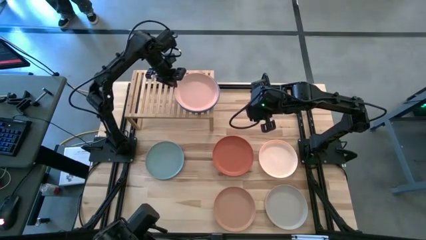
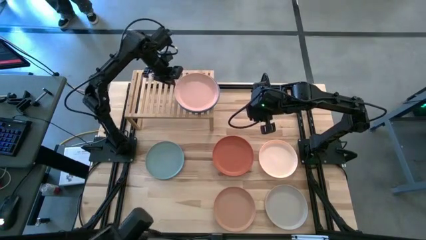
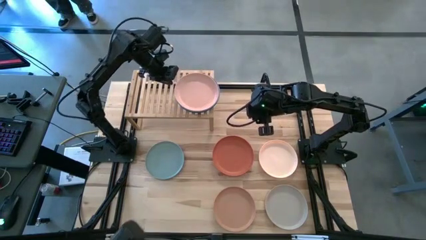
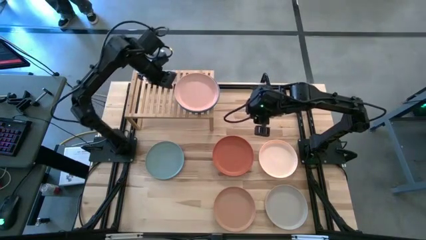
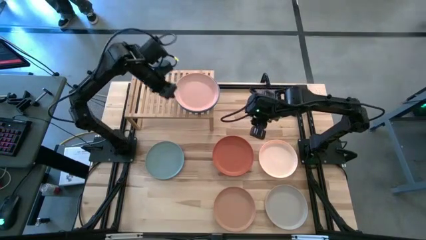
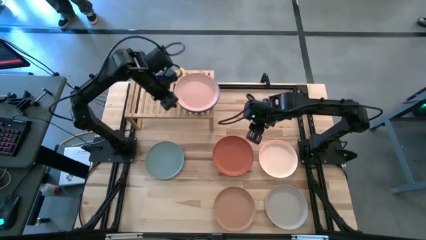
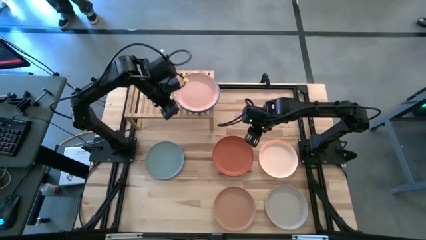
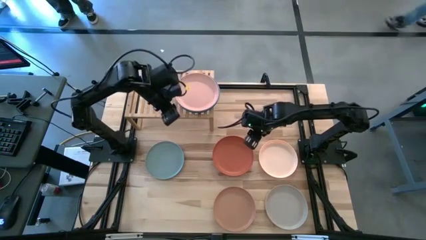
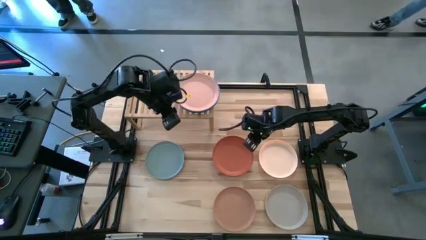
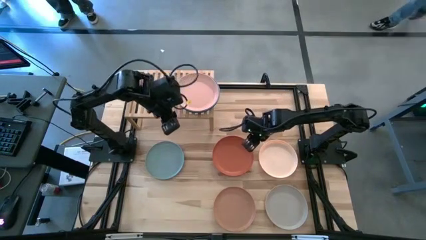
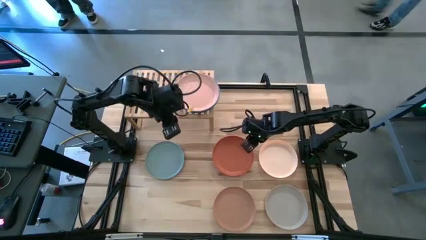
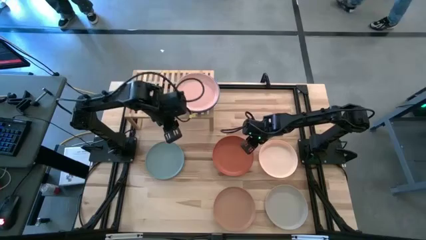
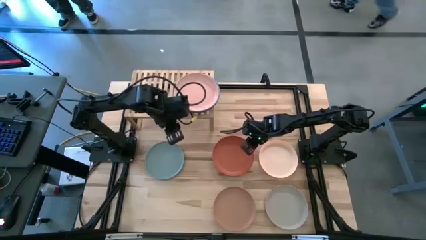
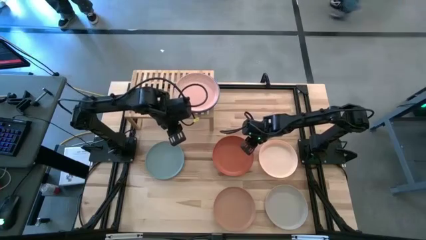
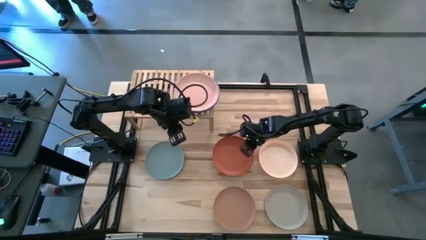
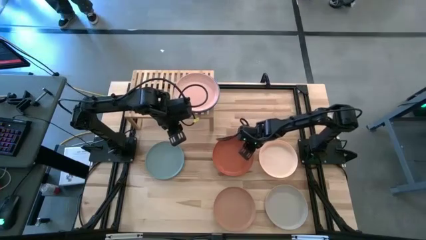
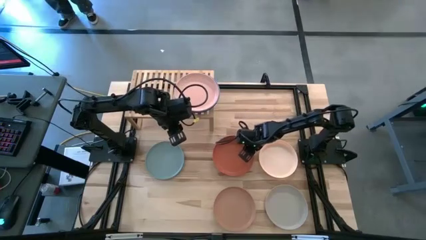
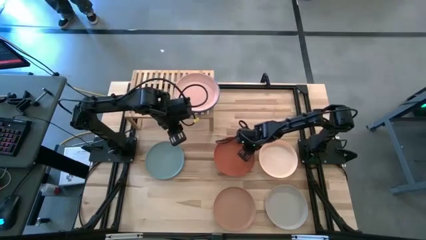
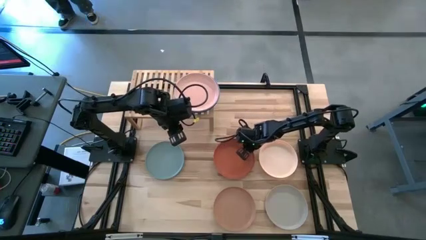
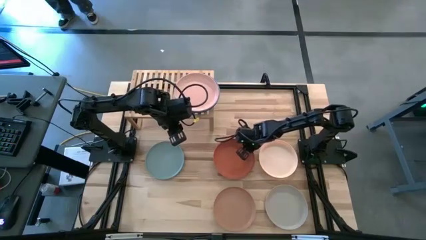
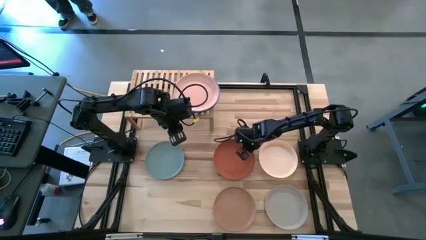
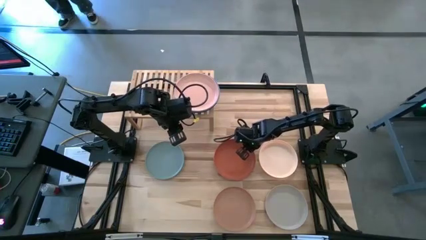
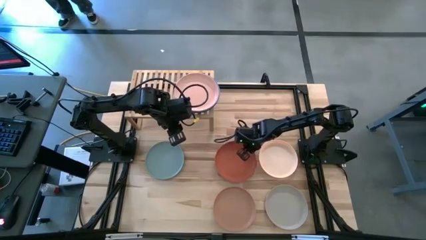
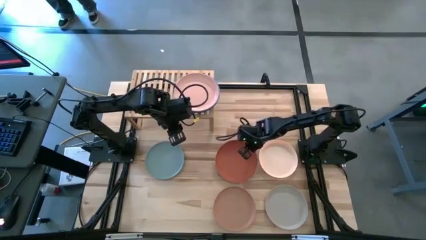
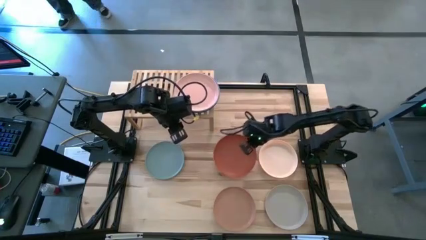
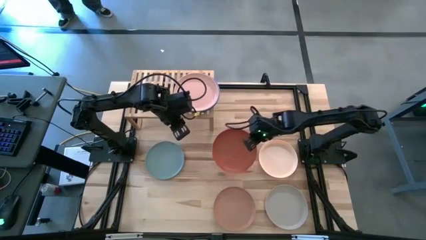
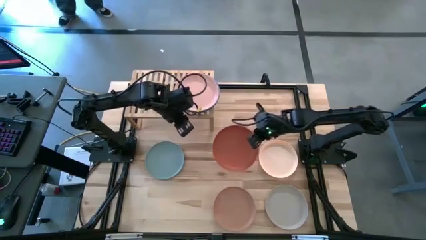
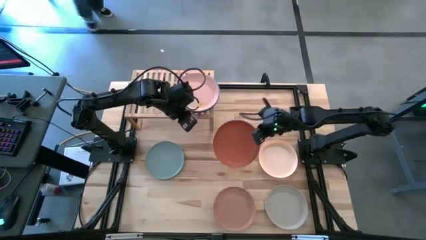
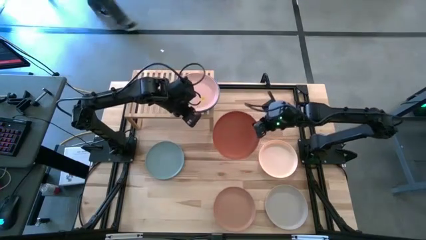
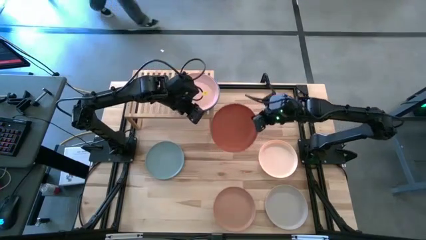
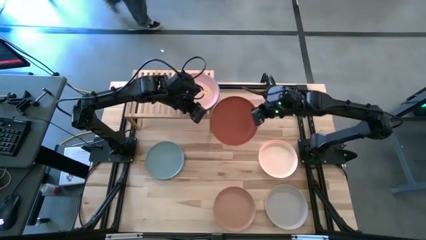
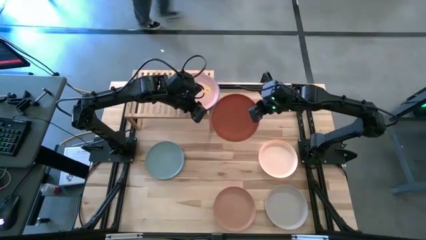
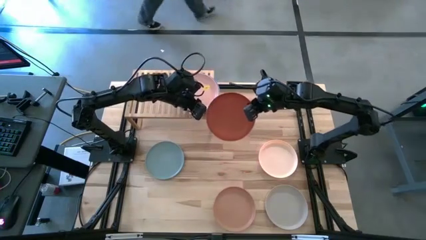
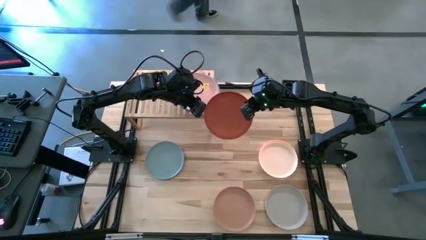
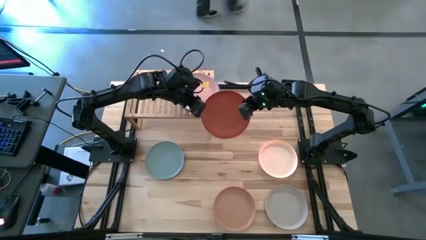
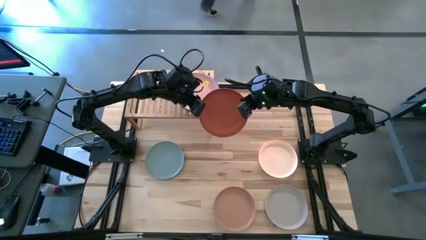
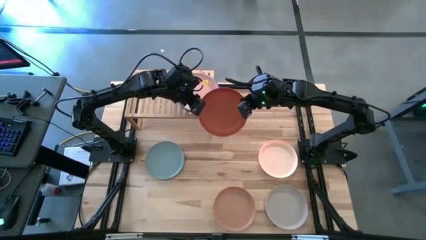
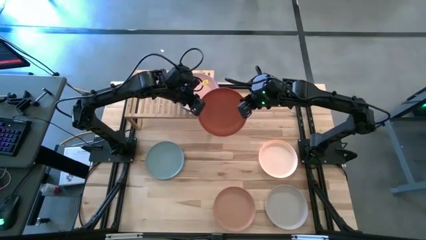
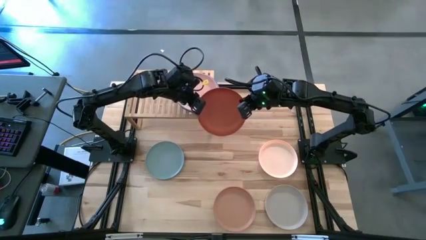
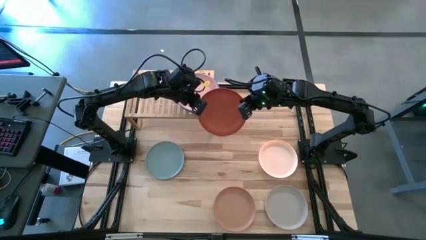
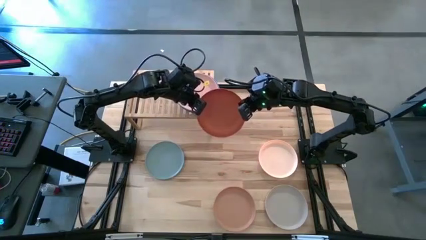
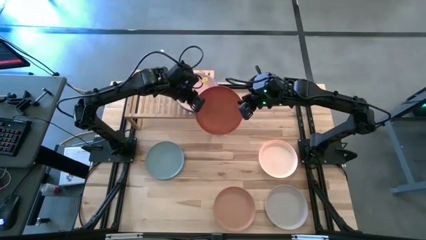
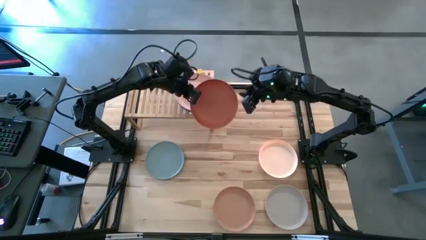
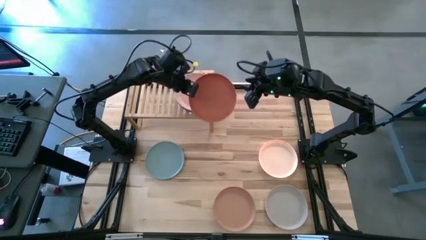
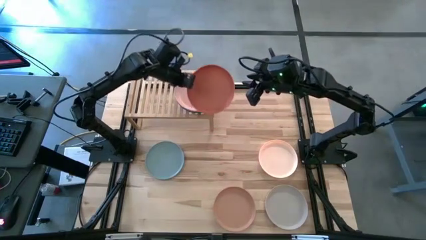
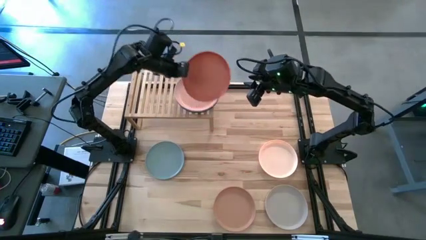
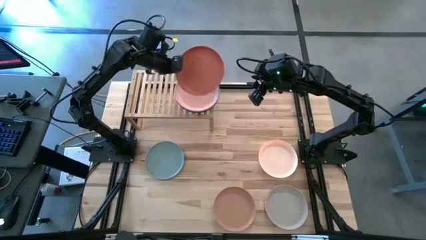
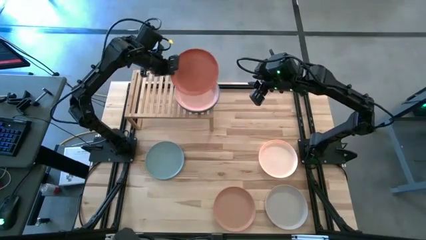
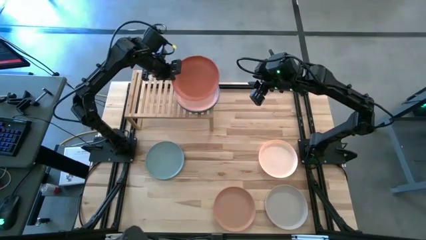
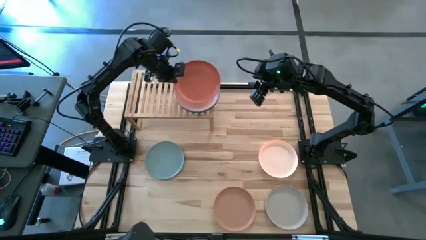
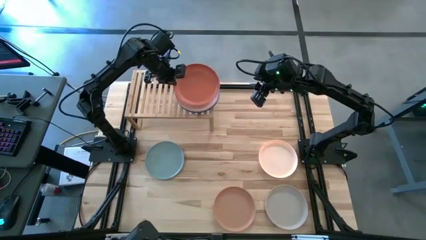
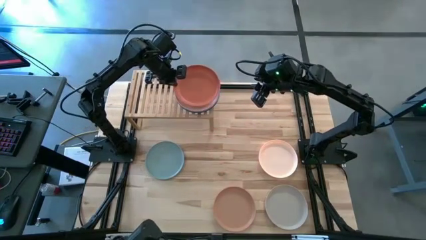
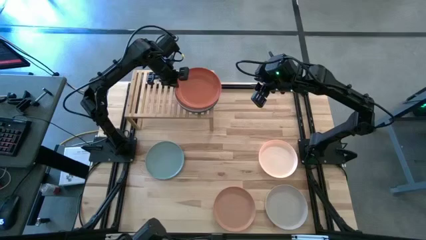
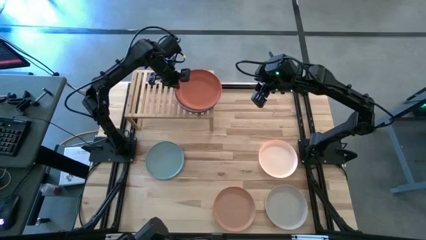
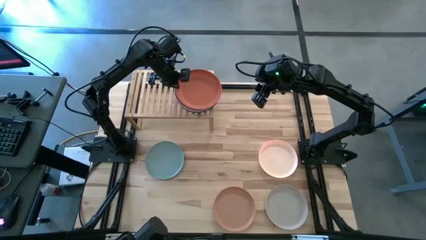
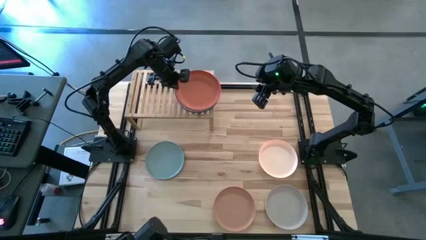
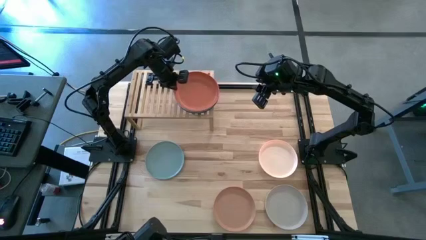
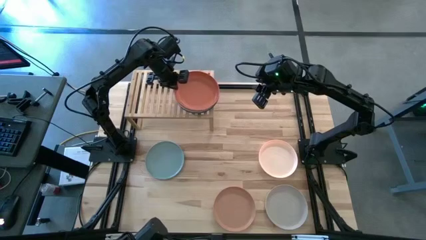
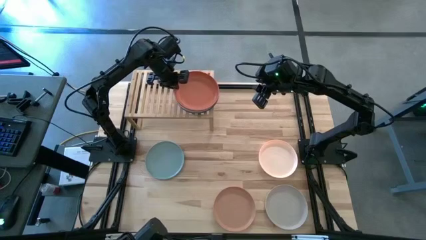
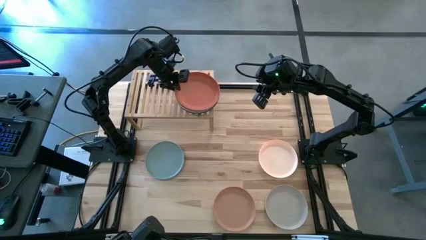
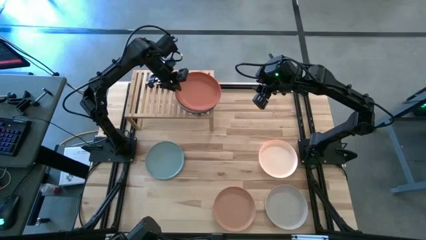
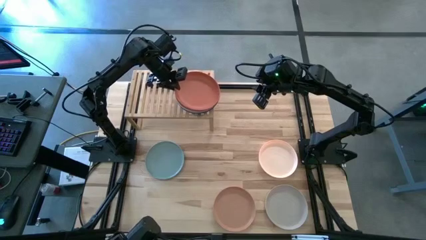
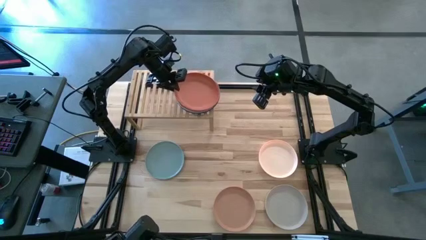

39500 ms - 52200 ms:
Task: Place and stack plates onto a shelf
Stack the orange plate on top of the light orange plate on the shelf
